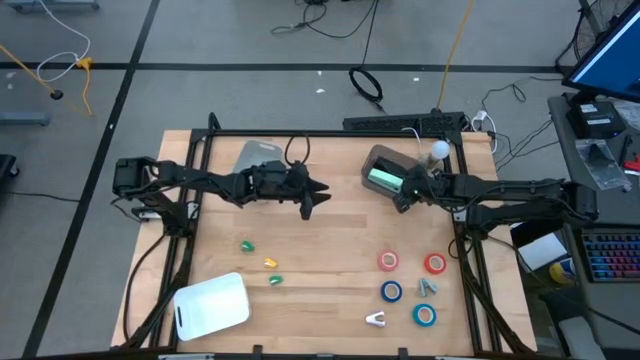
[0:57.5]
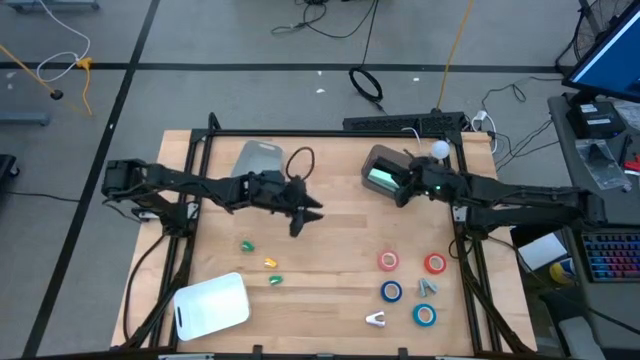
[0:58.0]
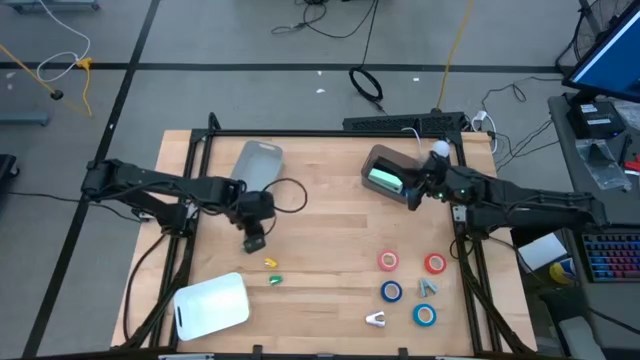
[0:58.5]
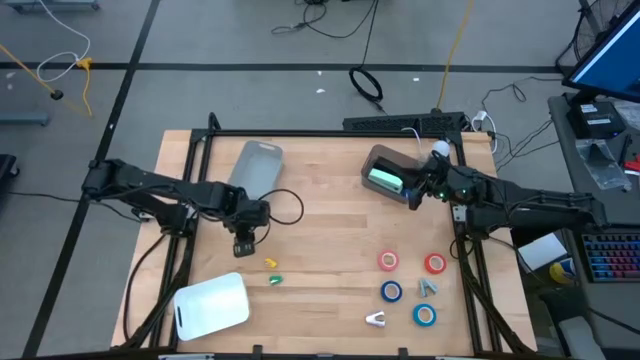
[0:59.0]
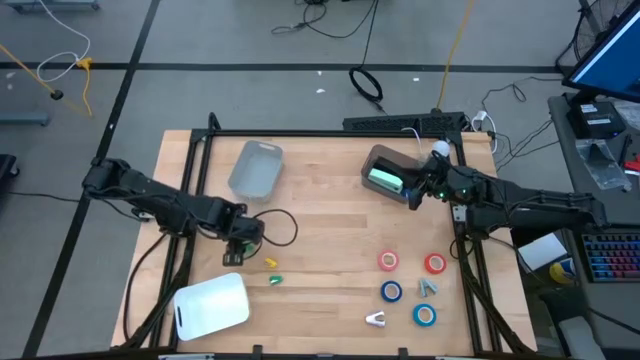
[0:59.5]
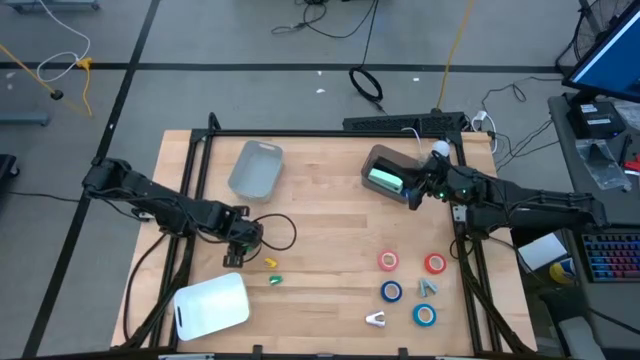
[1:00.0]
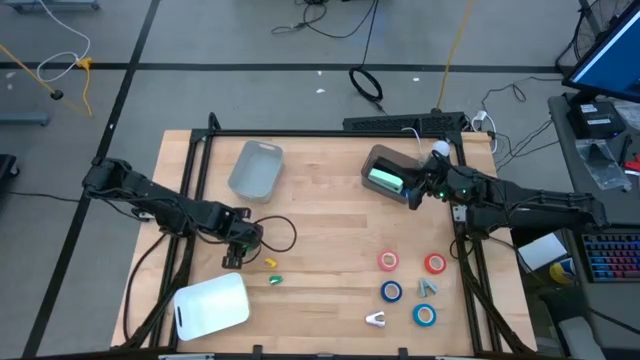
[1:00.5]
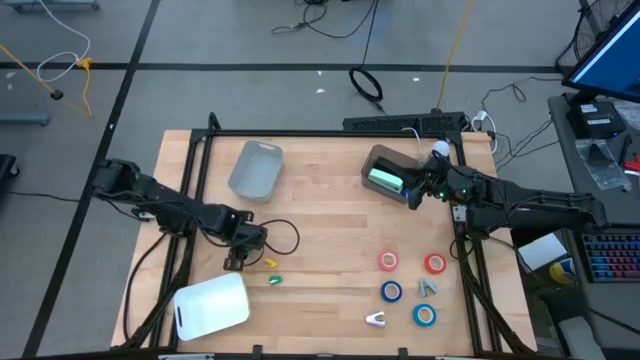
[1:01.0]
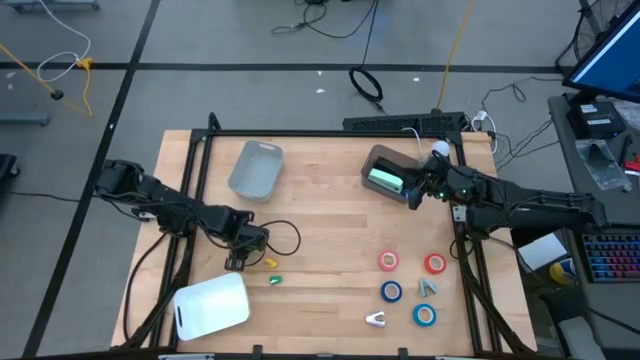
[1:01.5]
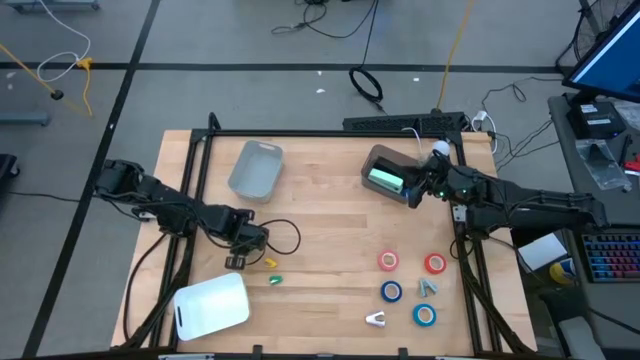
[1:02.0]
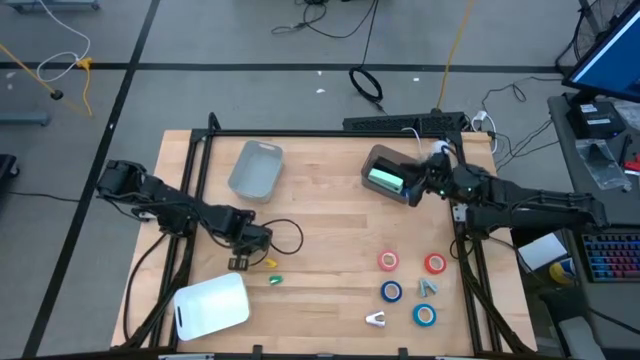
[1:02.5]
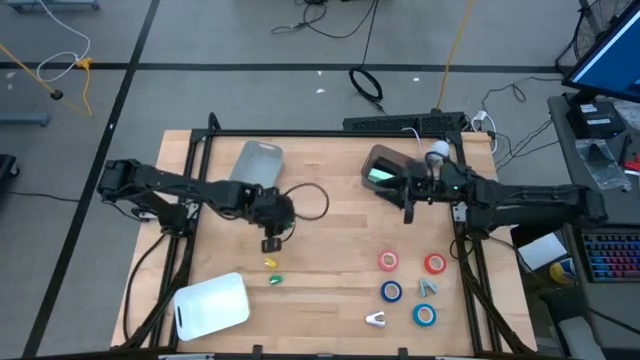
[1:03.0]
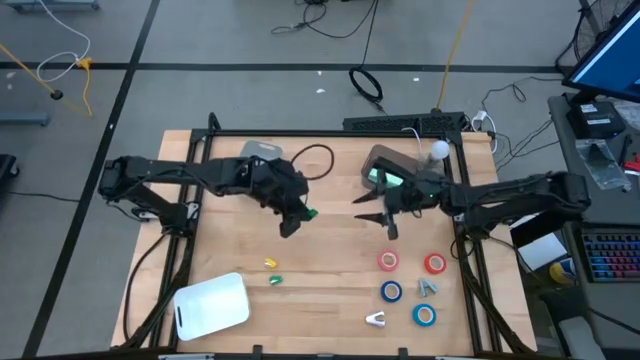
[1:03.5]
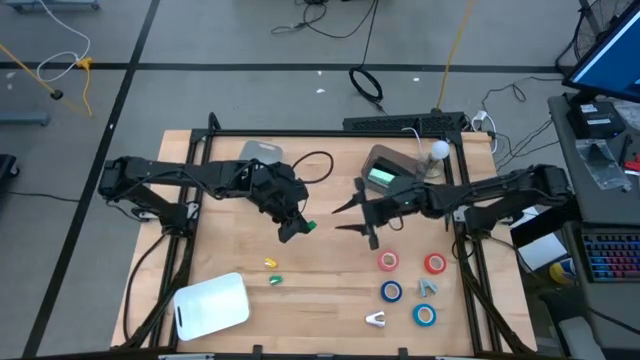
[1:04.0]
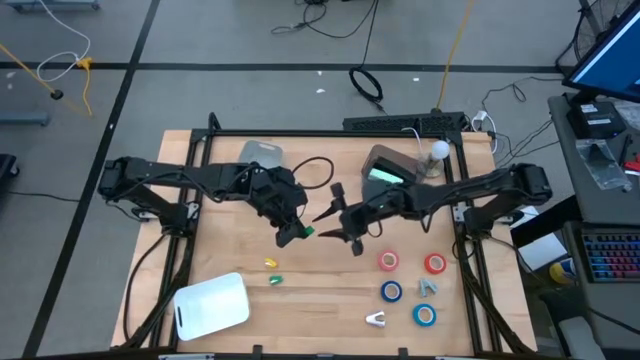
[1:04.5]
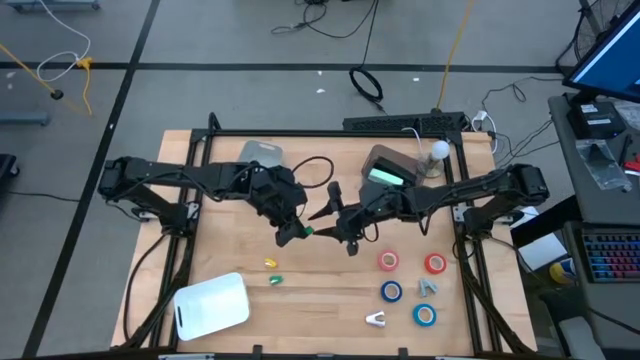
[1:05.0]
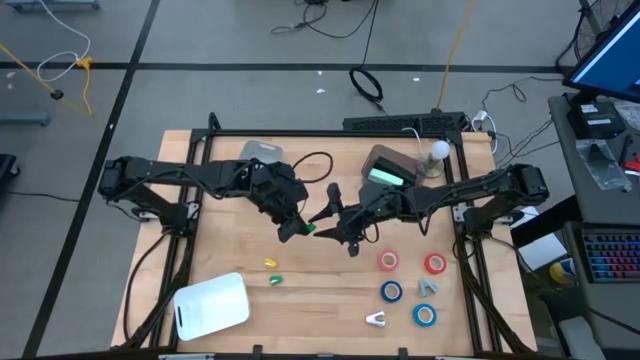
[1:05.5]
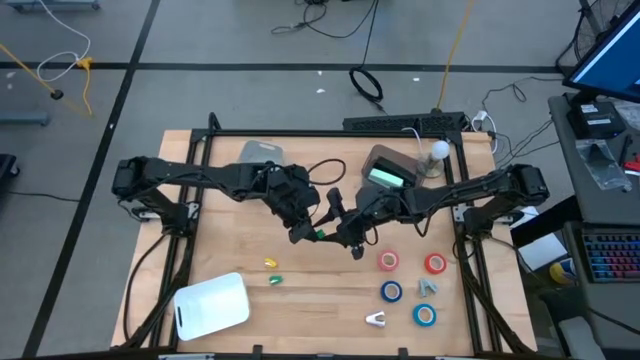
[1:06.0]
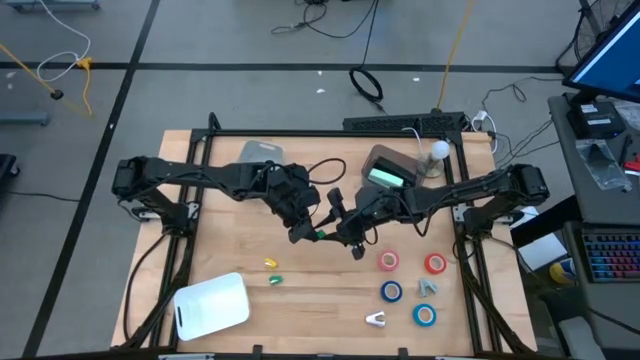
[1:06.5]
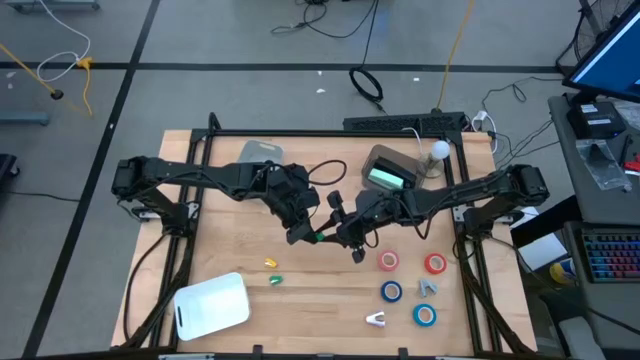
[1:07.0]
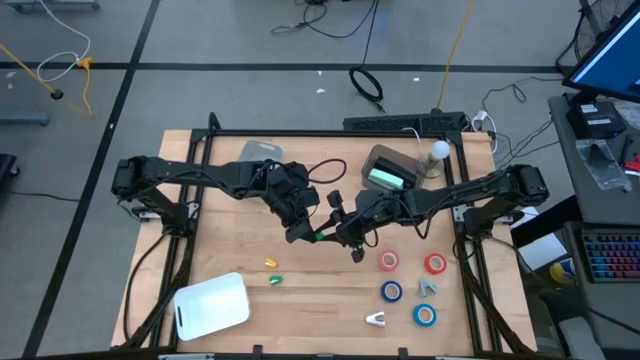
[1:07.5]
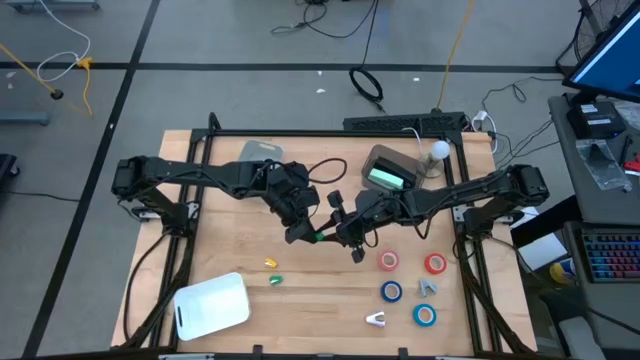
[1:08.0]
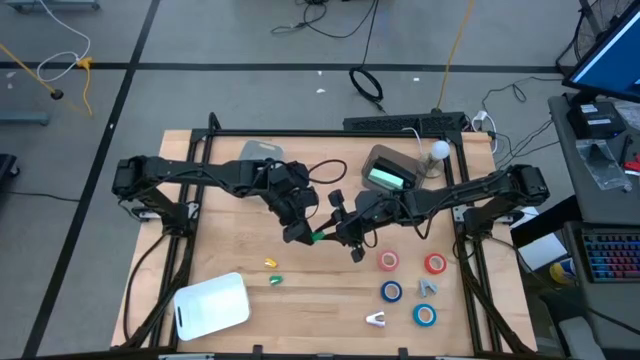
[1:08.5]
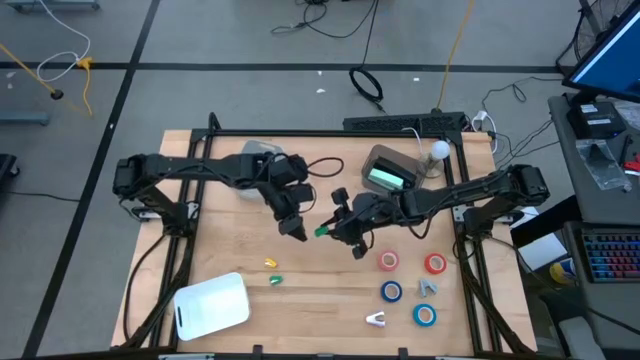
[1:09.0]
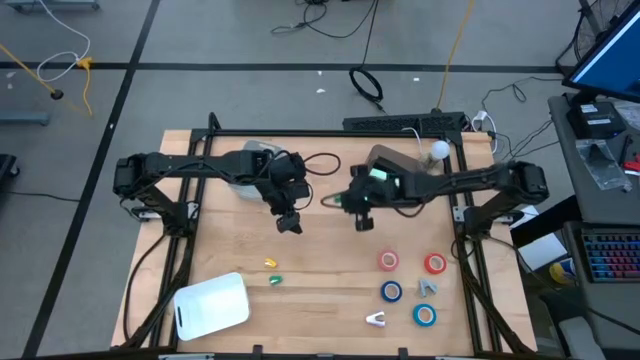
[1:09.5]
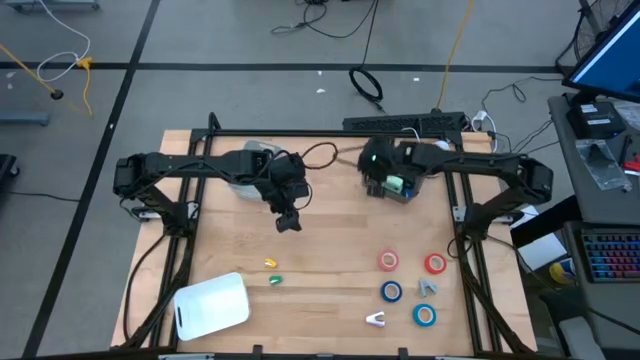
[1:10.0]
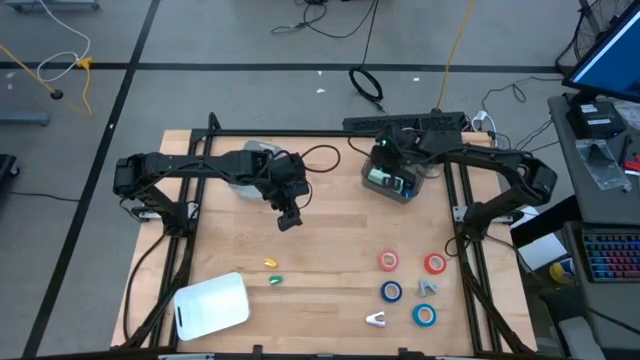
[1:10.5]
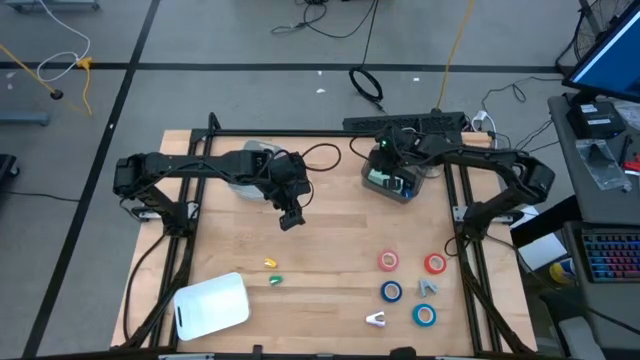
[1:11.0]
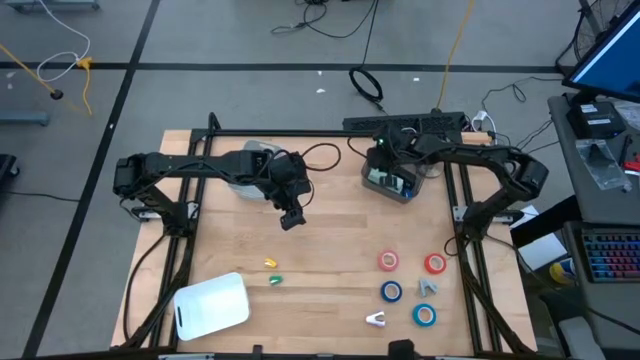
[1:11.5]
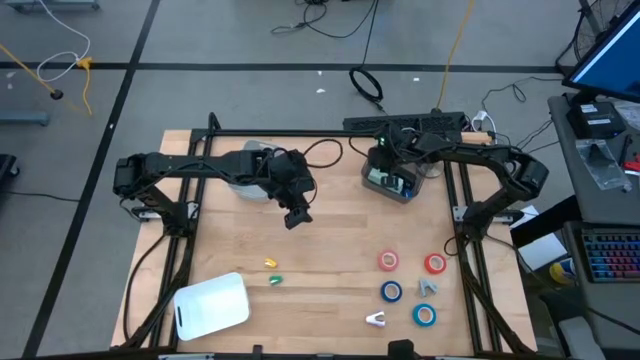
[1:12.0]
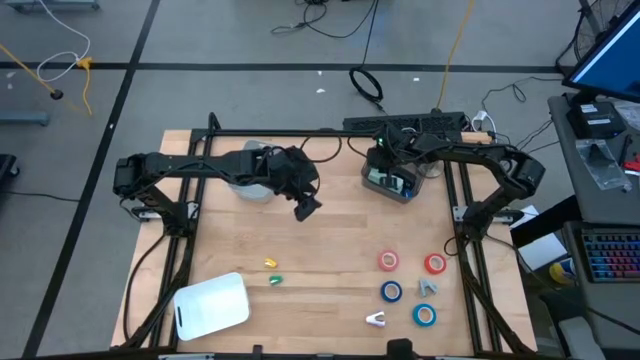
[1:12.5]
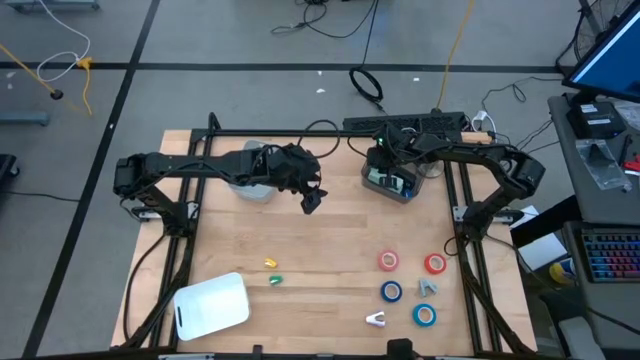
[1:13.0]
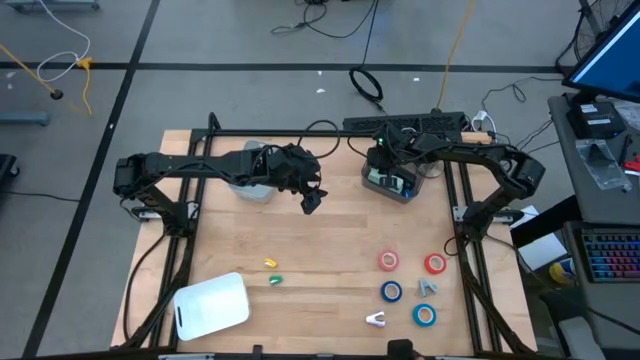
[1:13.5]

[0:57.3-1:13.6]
Task: Pick and place Stapler, Stapler remover, tape
Put the top small green stapler into the black bin

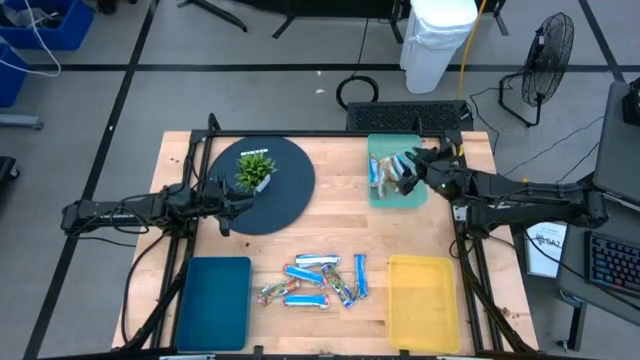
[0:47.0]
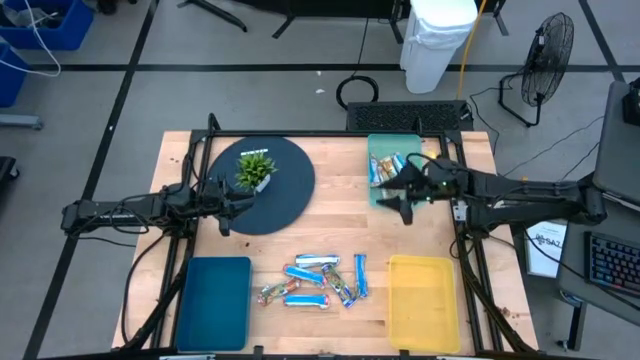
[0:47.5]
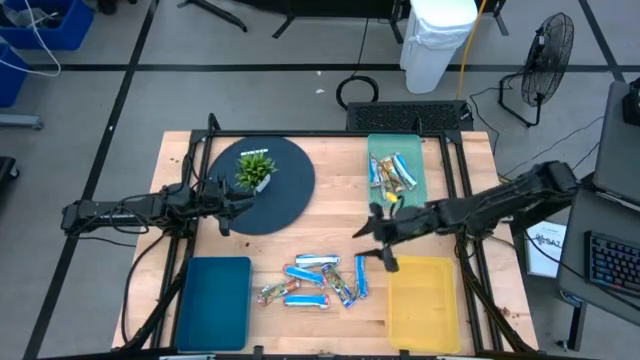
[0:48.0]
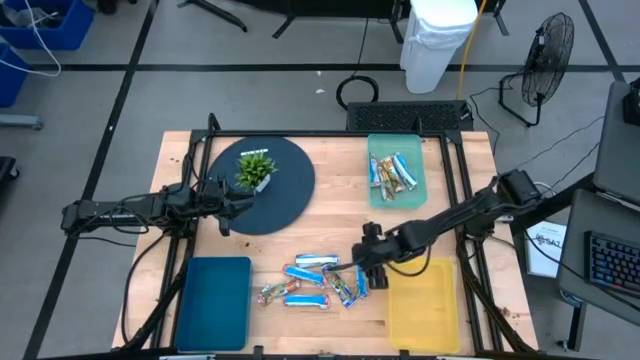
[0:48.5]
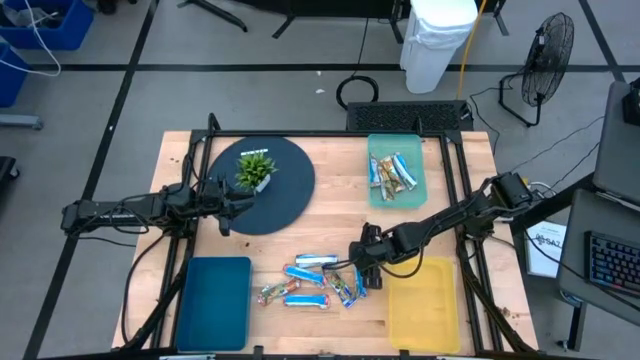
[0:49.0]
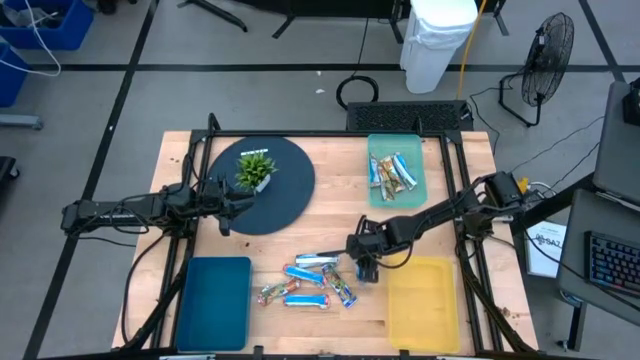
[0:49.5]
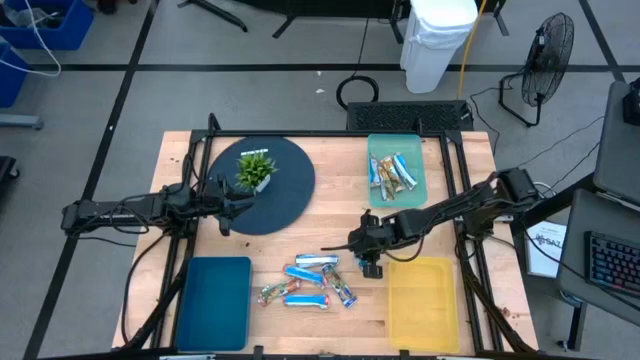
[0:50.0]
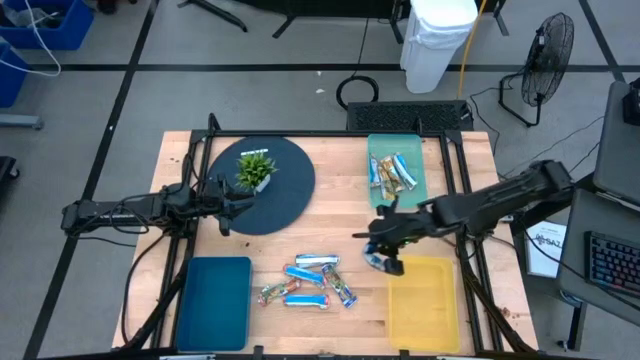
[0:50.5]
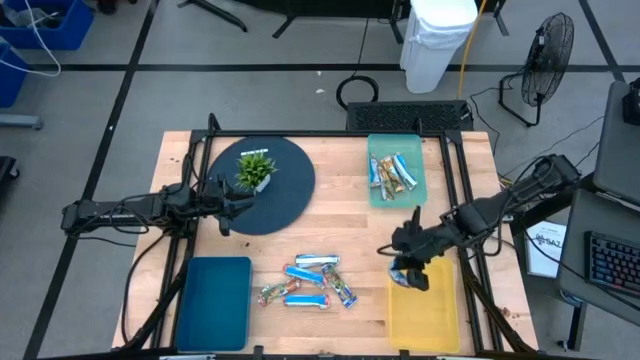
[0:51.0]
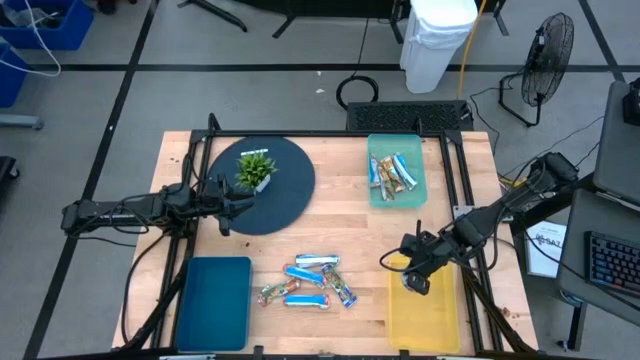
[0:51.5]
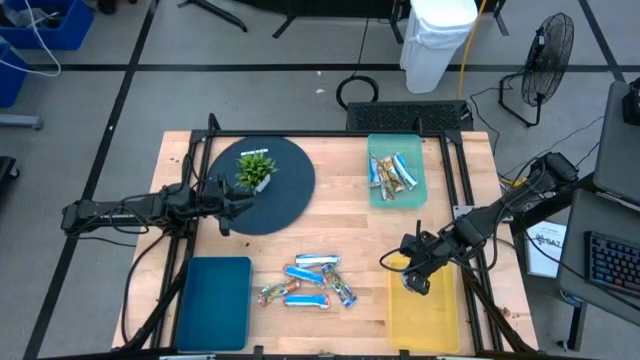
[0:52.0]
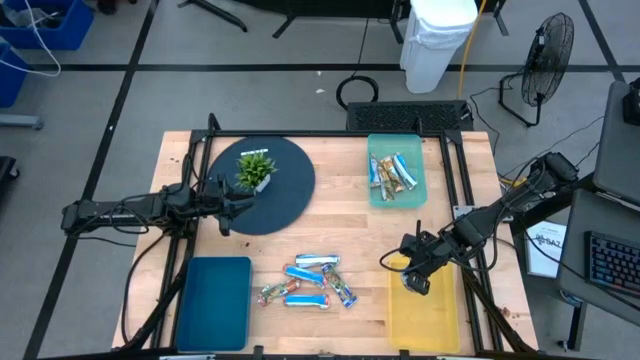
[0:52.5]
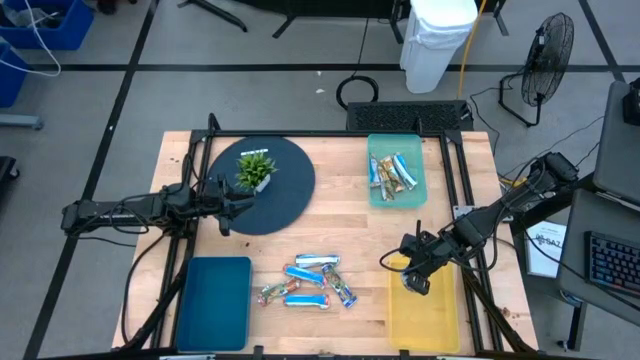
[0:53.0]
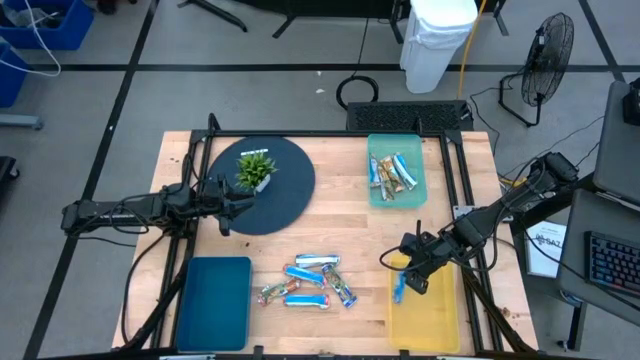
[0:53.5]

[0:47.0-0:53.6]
Task: Pick and place Granola Bars by type
Put the blue granola bar into the yellow bin
